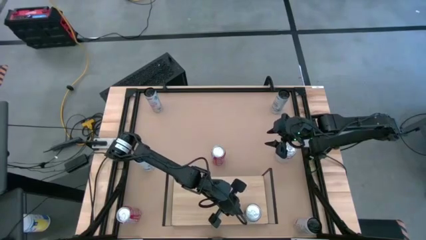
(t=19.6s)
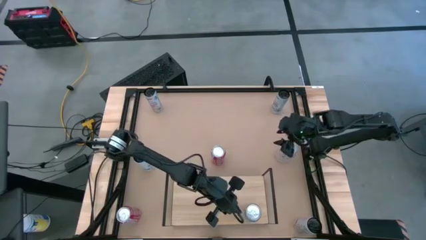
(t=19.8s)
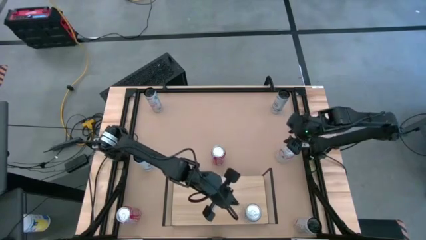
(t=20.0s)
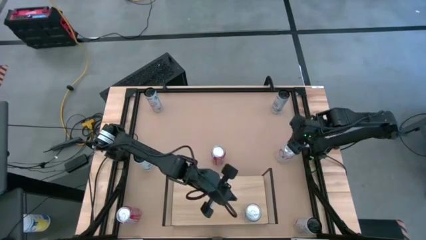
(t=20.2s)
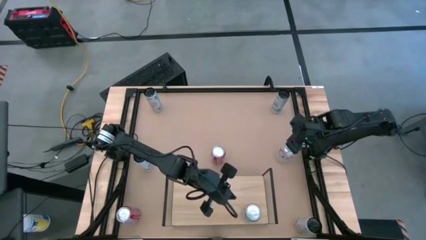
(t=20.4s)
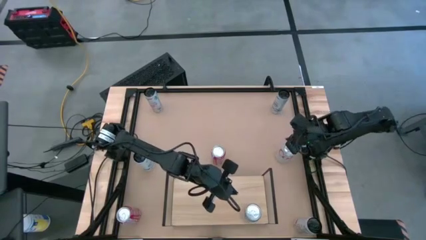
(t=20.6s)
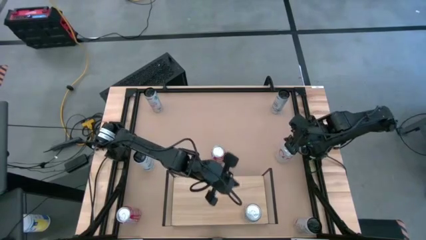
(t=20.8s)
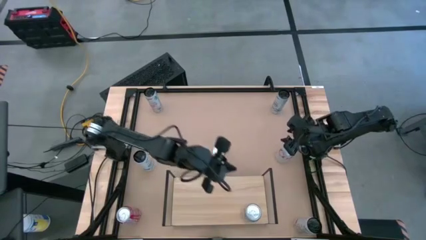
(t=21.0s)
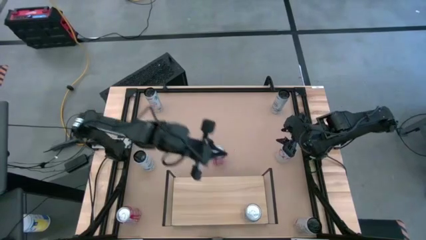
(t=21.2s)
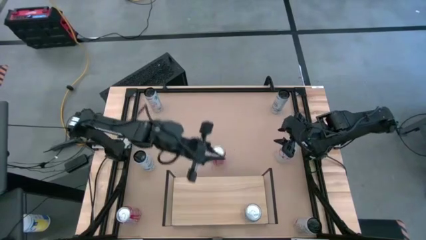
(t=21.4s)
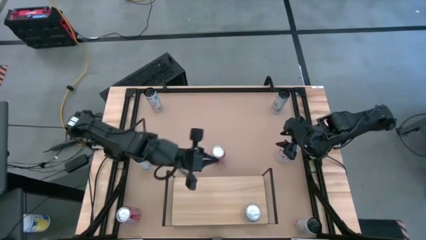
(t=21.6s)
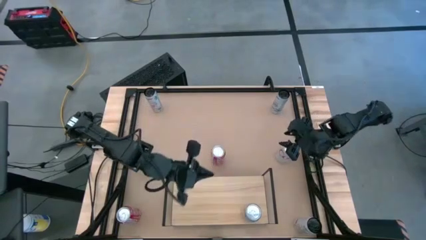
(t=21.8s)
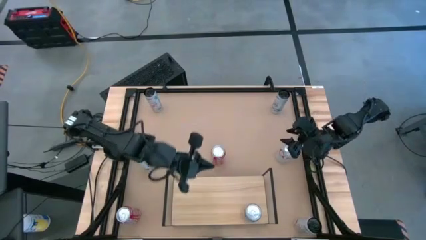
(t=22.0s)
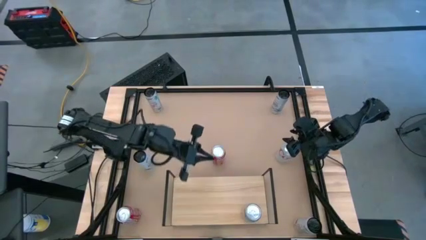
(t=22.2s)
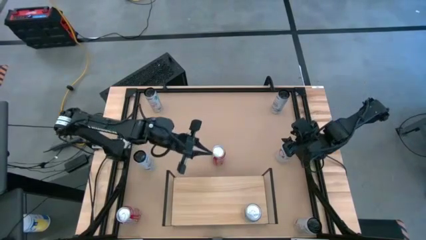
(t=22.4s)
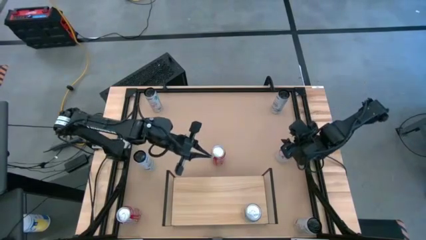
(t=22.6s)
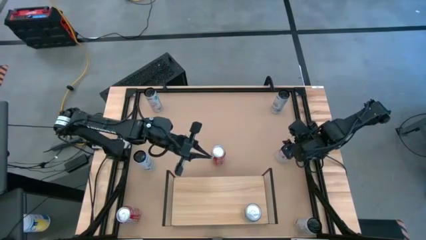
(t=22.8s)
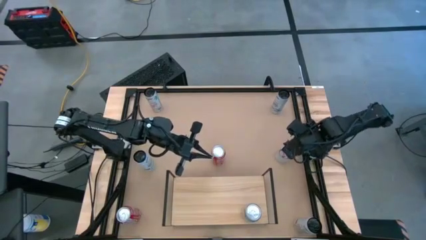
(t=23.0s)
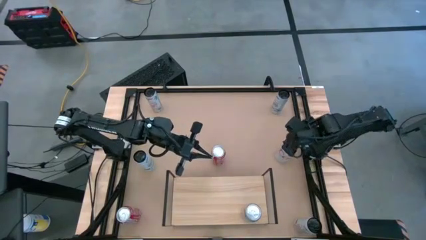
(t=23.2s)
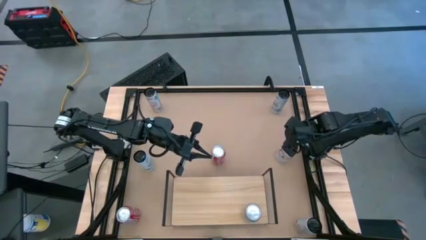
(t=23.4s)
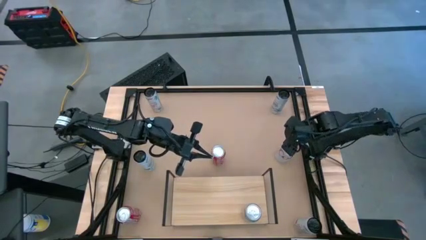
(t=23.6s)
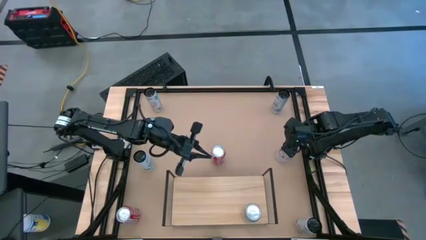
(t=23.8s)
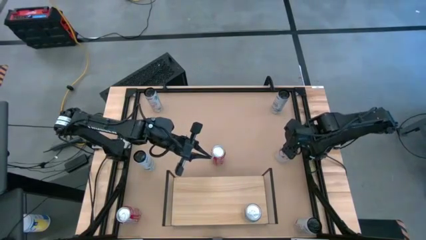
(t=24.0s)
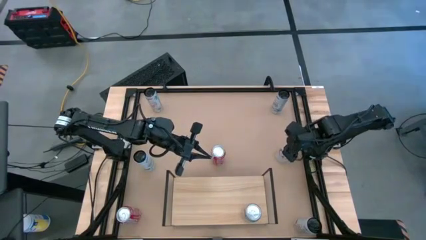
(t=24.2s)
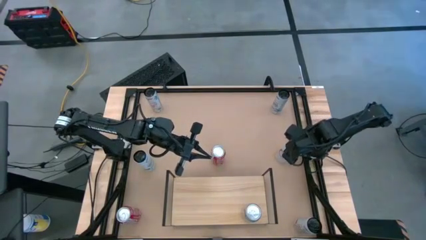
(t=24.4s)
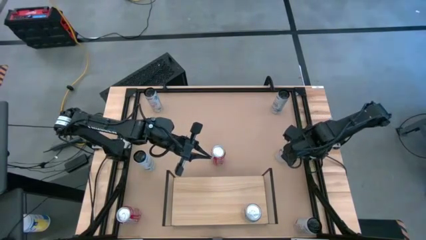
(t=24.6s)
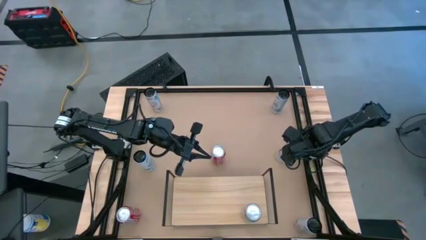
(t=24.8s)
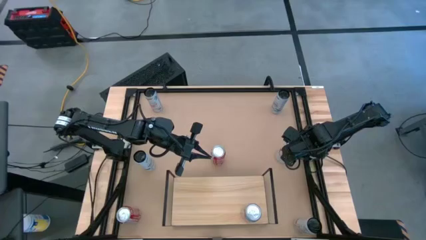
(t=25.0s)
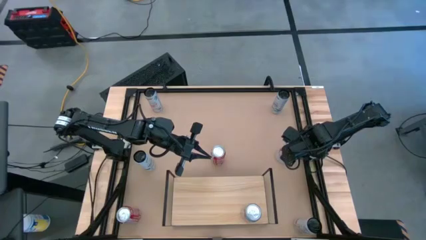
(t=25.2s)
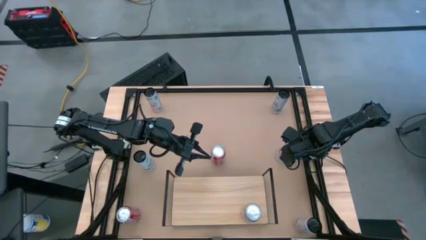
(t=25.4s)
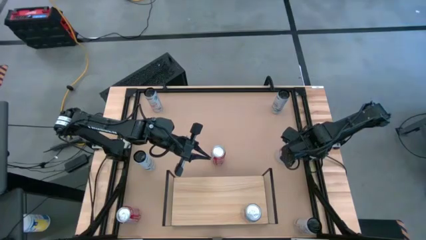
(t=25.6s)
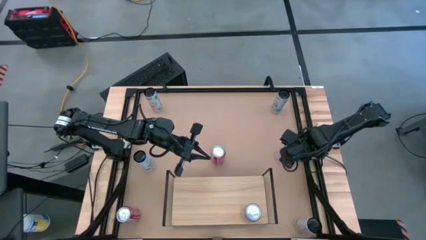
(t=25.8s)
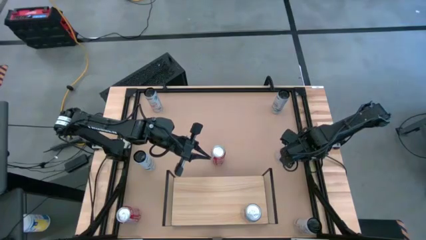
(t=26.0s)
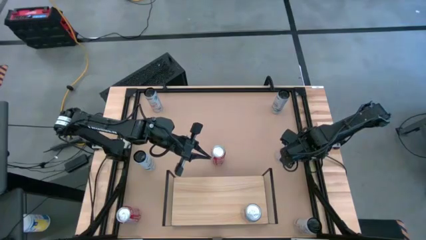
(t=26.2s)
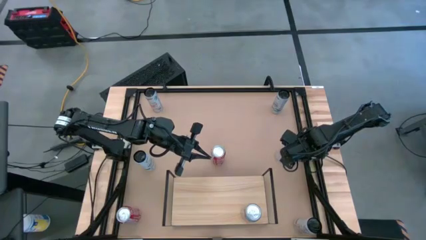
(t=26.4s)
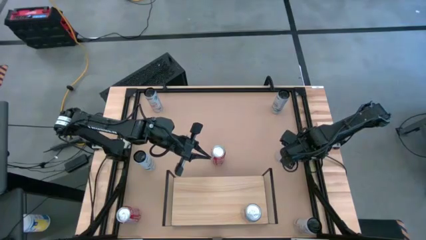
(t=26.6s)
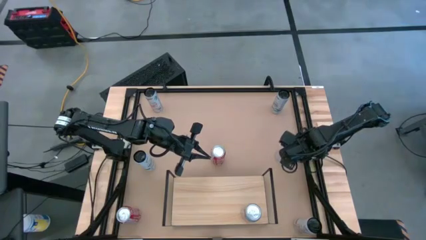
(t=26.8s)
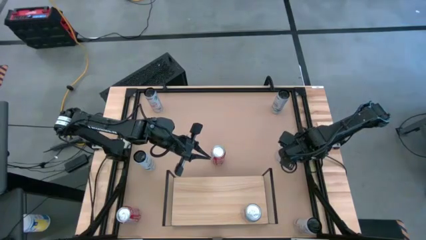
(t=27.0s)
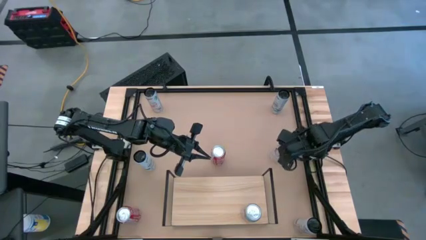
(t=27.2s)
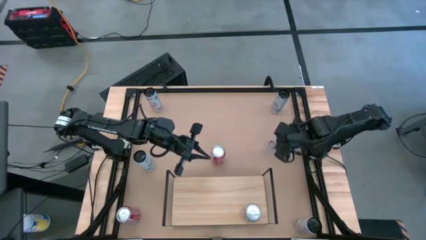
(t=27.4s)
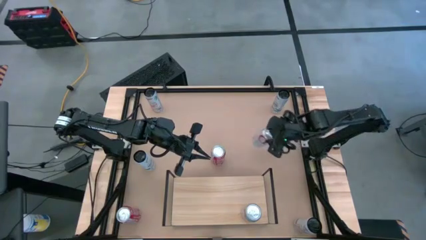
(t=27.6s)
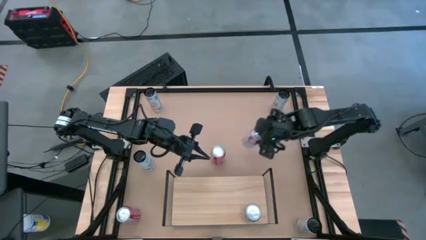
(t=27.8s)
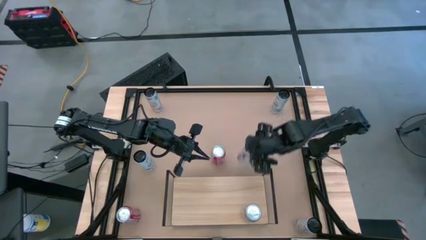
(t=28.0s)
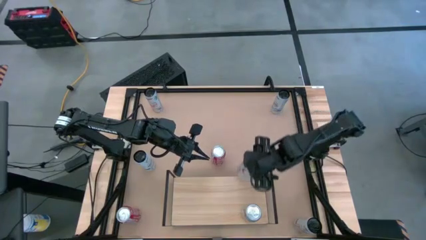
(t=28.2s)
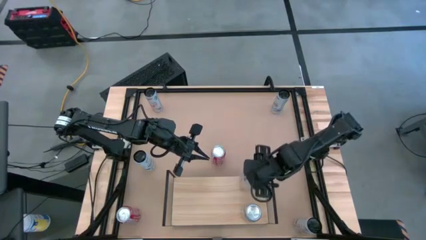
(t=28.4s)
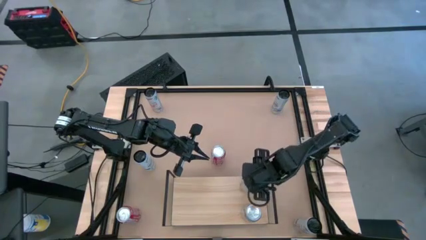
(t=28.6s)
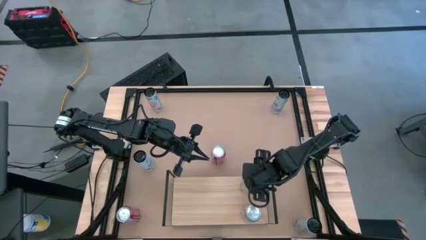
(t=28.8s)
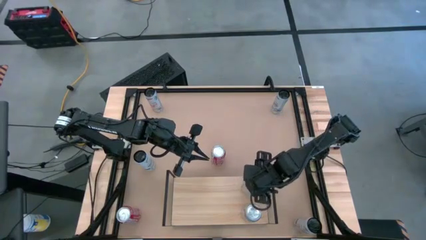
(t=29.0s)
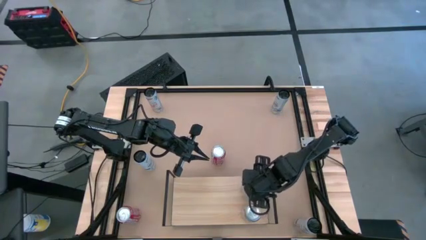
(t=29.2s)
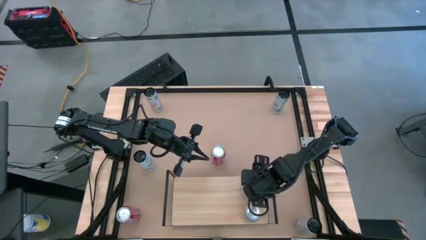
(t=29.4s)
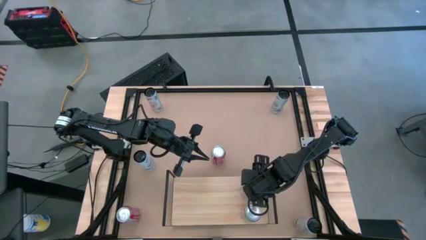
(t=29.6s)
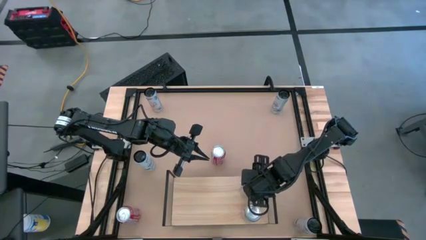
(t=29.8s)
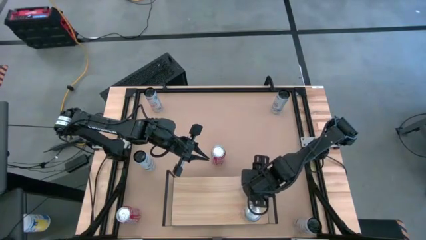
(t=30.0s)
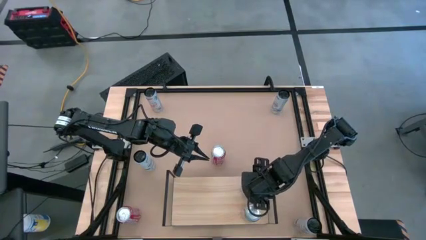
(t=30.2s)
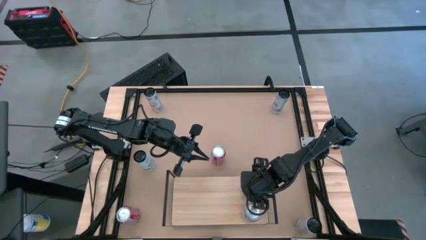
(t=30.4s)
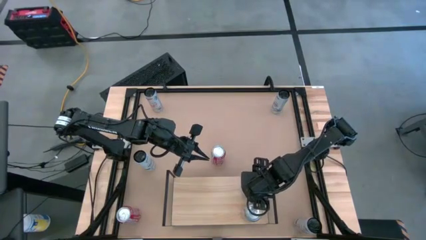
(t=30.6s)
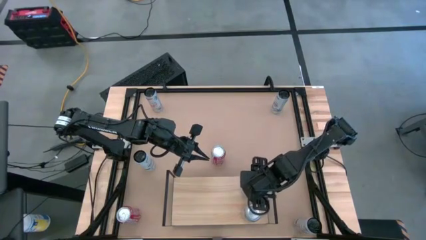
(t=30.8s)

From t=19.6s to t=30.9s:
Task: Place canned beverage on shelf
Put the silver soda can aligned with the other silver soda can on the shelf
